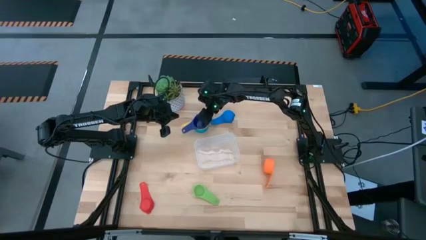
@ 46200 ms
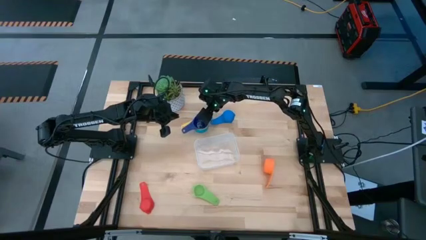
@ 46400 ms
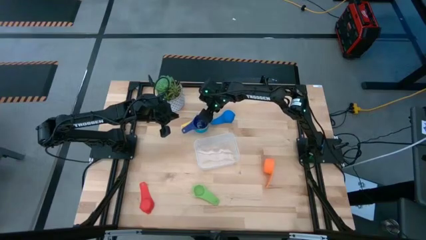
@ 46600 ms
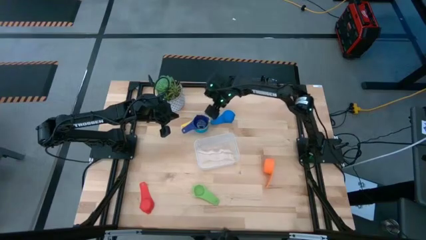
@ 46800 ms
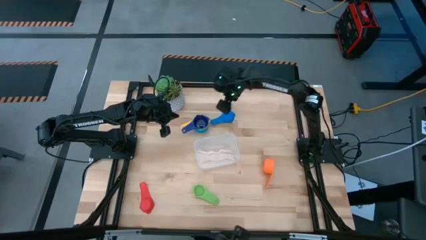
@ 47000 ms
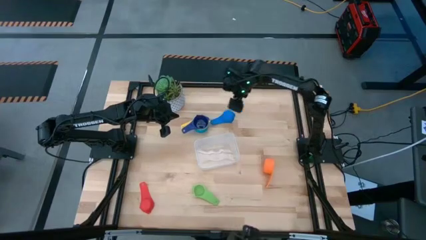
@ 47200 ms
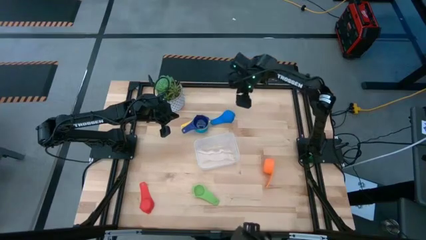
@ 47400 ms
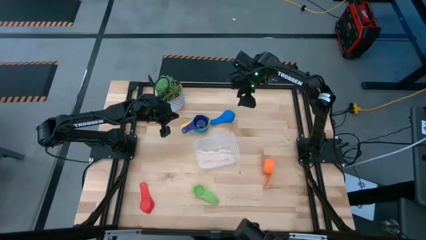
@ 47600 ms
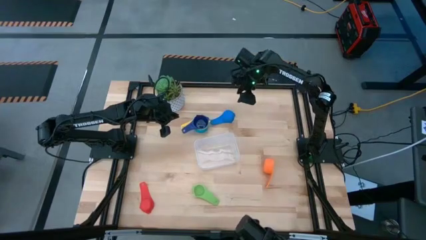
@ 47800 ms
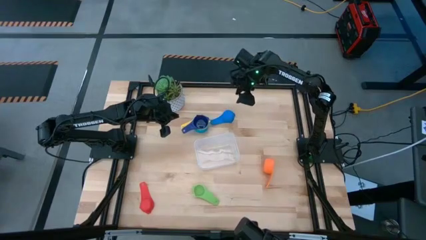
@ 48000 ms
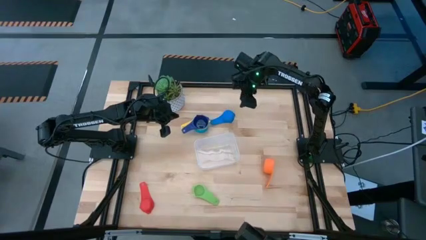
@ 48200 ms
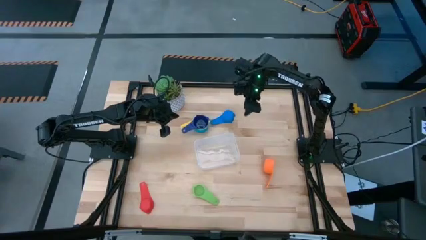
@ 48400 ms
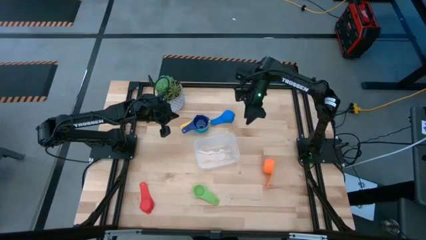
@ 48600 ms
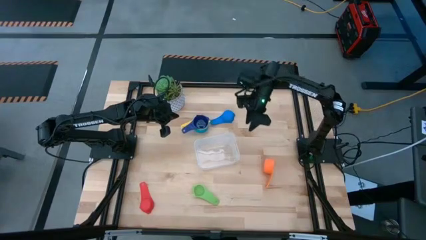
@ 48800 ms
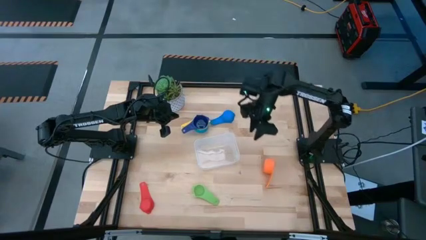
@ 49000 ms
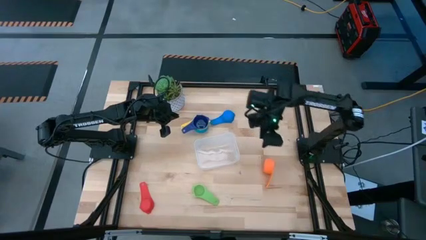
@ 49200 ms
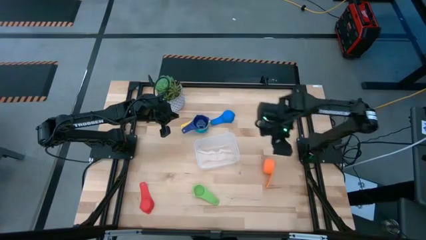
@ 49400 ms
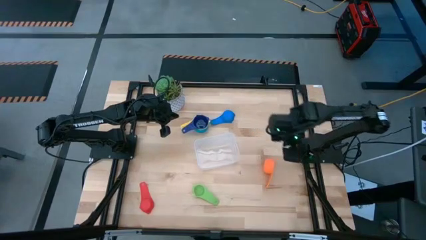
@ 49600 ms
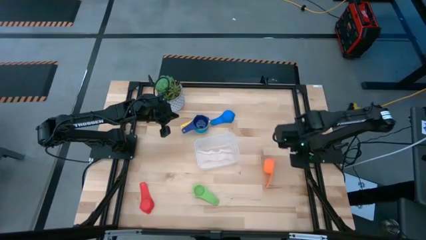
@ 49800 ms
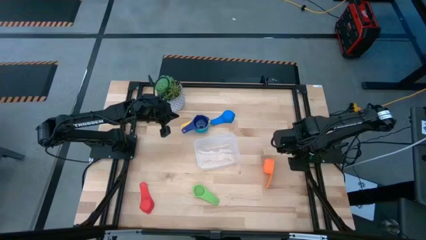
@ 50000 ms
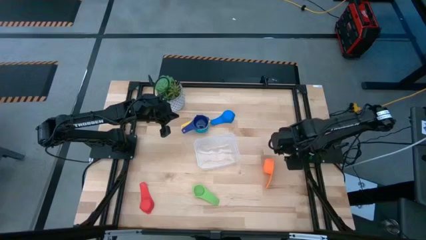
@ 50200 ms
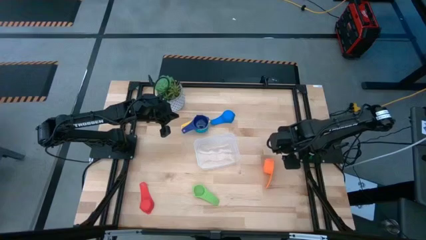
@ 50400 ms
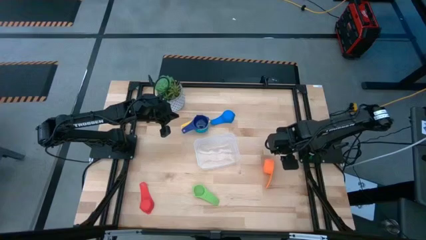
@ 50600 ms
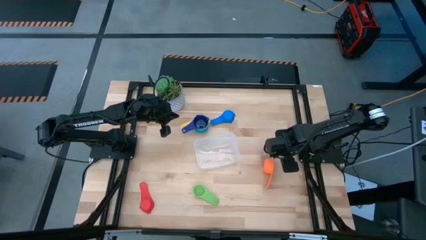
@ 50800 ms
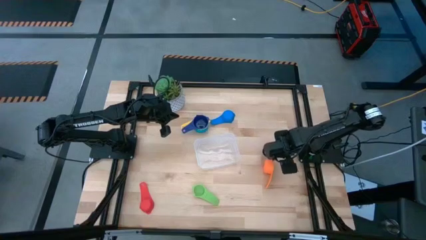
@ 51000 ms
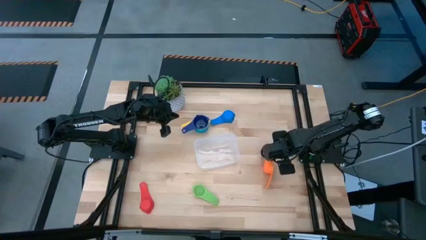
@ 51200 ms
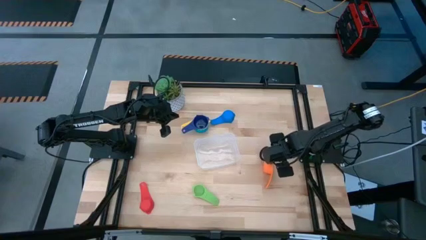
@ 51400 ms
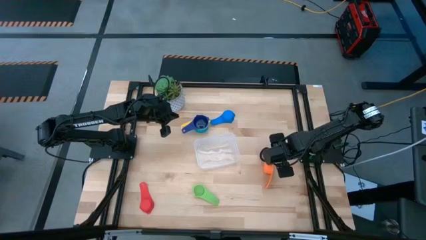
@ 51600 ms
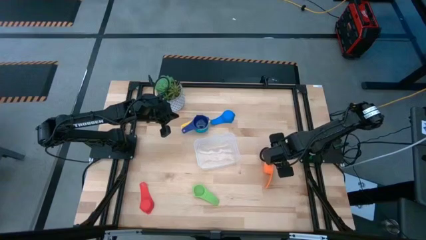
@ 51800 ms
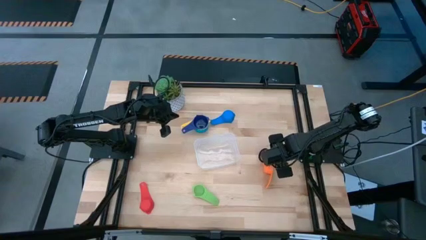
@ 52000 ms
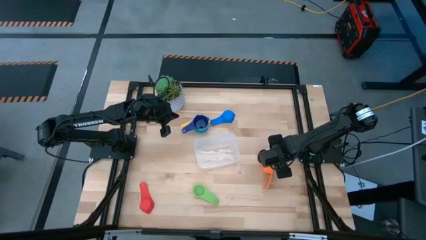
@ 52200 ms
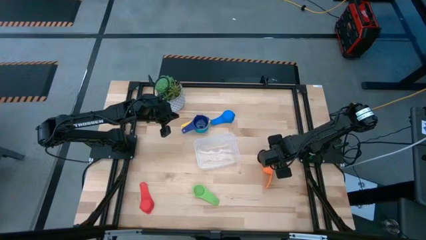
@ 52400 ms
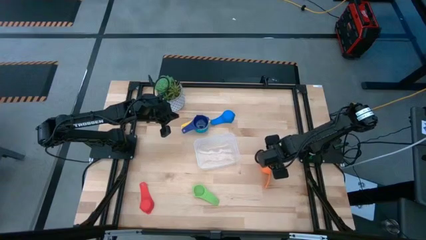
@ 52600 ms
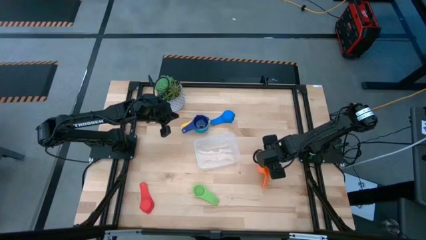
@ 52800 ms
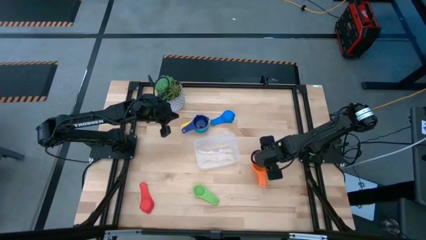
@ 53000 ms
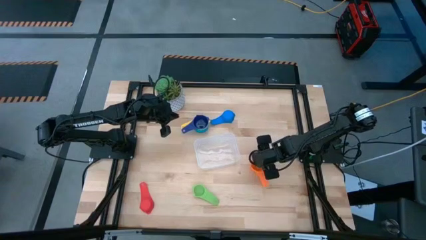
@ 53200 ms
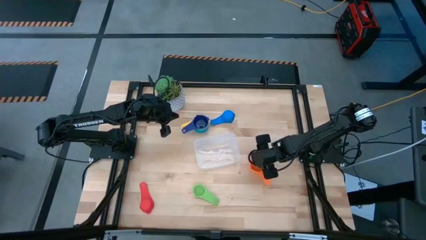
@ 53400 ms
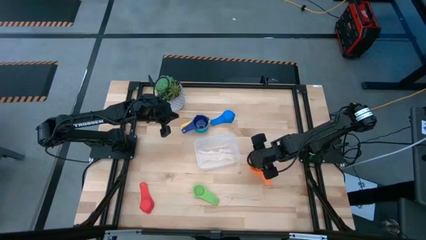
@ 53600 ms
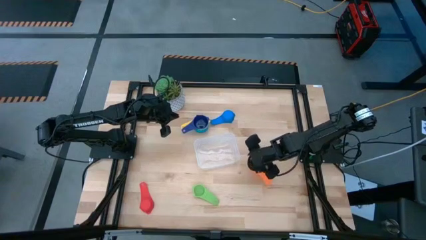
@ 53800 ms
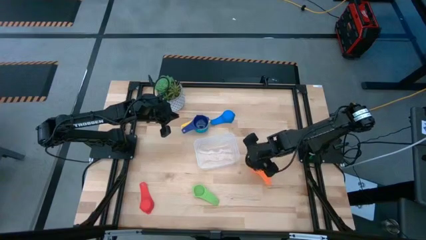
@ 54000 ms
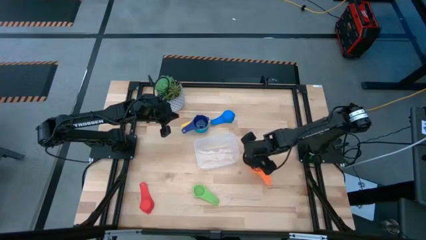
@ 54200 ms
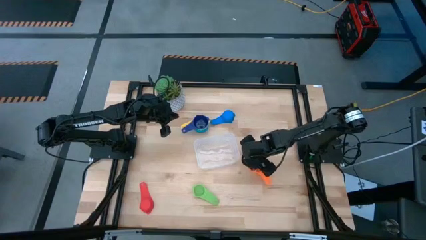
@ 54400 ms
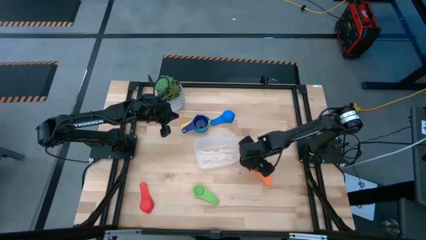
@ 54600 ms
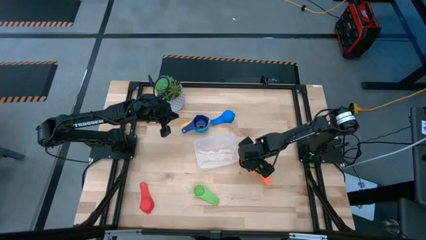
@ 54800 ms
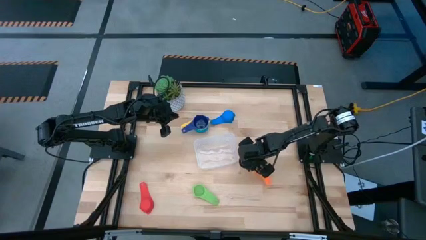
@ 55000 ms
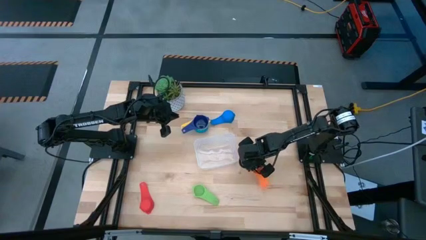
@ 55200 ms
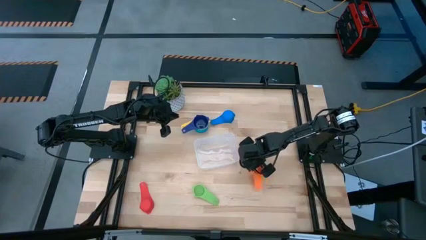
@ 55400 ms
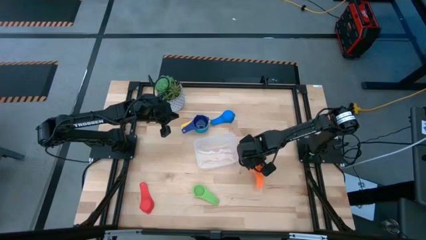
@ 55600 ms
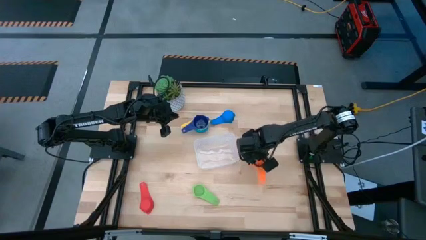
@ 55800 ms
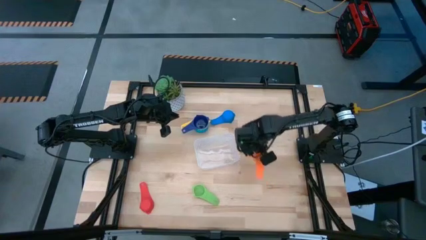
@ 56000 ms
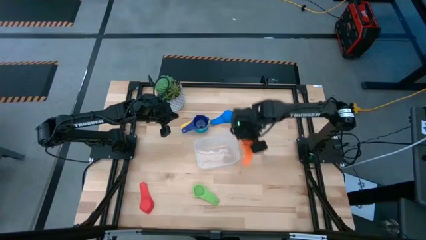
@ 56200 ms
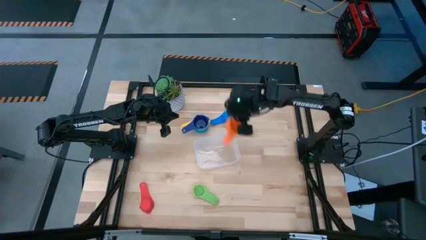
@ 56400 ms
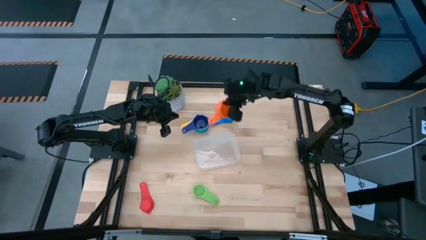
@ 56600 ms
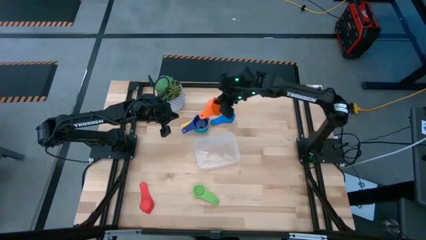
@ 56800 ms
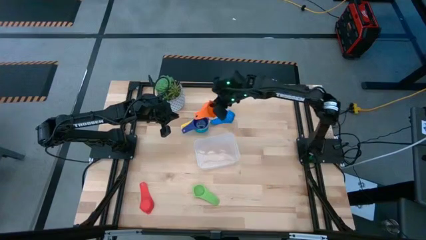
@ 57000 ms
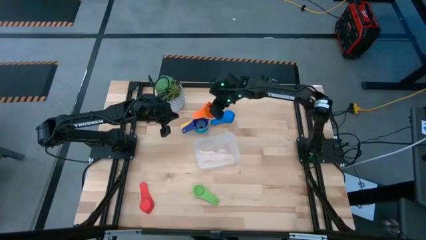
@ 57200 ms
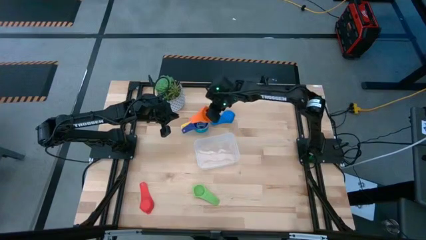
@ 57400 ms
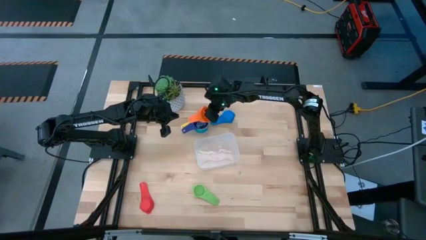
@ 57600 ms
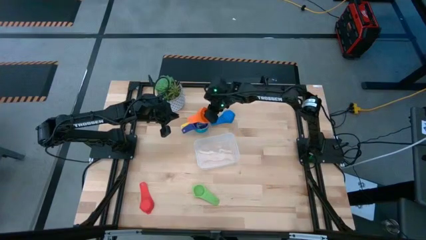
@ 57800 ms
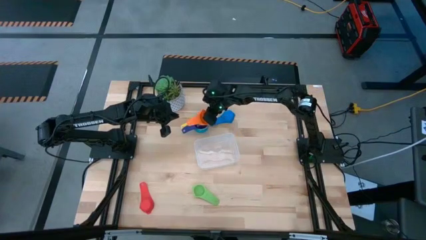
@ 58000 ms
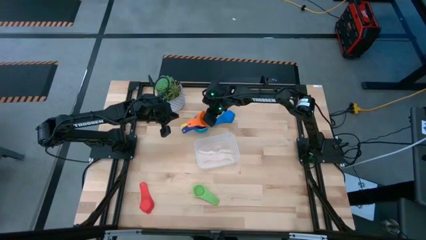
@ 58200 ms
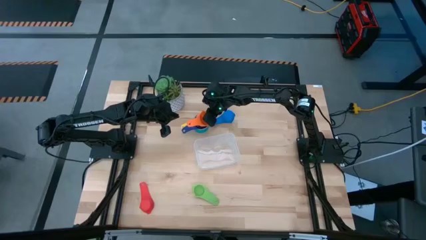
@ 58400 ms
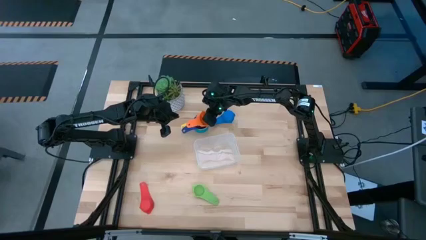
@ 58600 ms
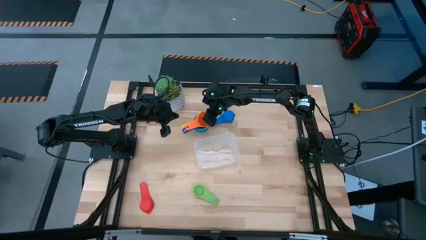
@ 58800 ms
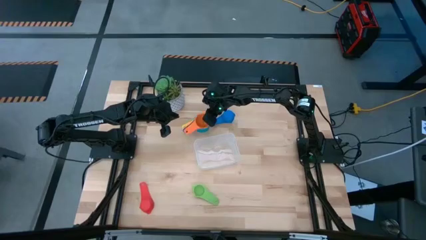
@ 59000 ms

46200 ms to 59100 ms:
Task: Nest measuring cups in basket
Stack the orange measuring cup on top of the dark blue measuring cup

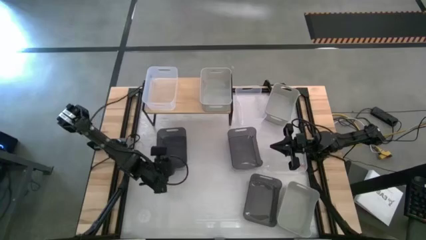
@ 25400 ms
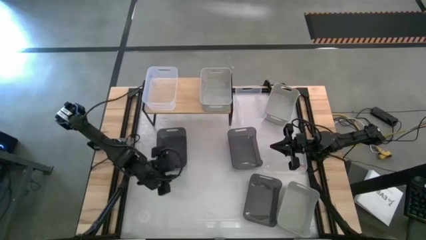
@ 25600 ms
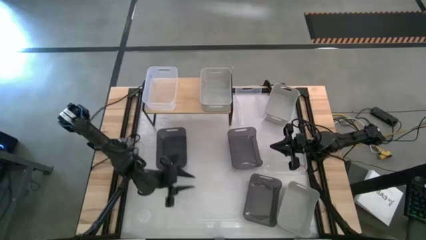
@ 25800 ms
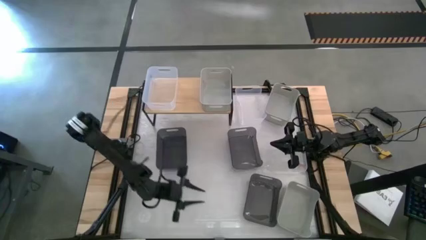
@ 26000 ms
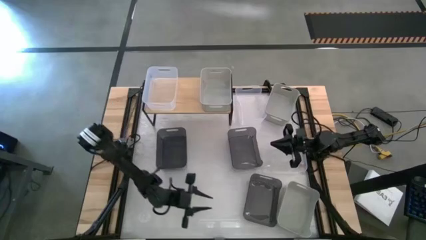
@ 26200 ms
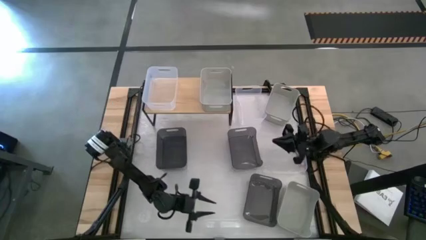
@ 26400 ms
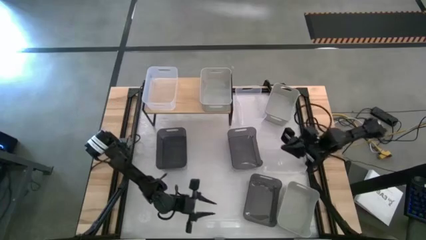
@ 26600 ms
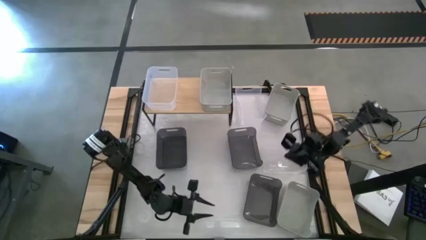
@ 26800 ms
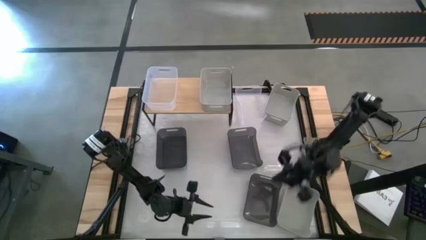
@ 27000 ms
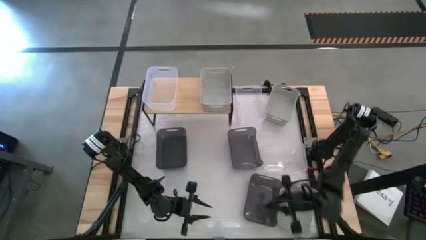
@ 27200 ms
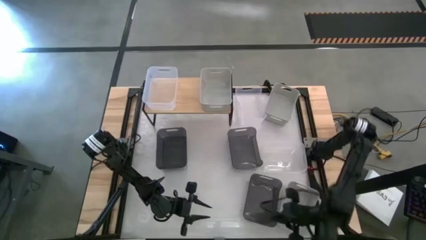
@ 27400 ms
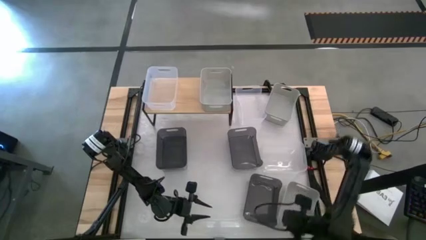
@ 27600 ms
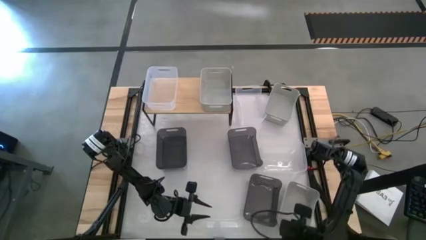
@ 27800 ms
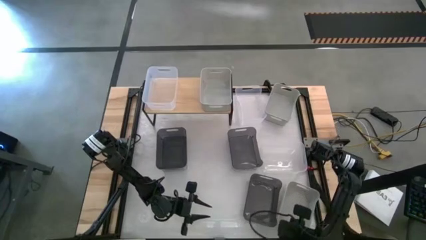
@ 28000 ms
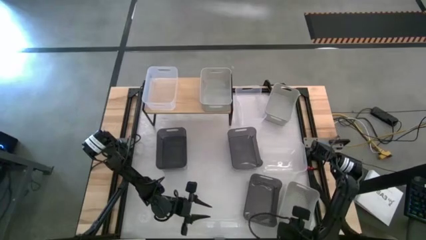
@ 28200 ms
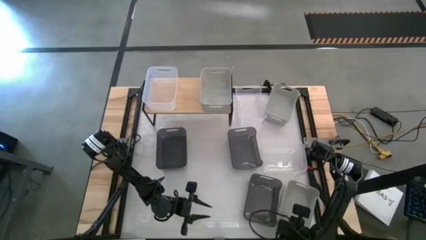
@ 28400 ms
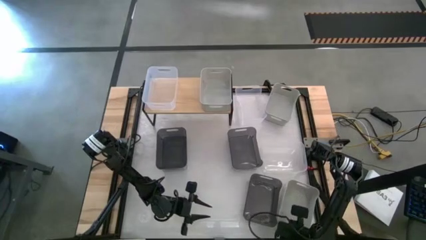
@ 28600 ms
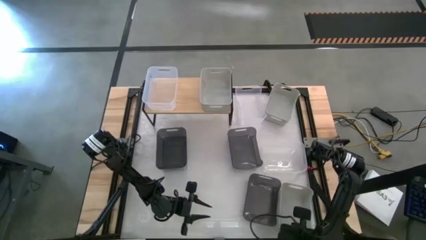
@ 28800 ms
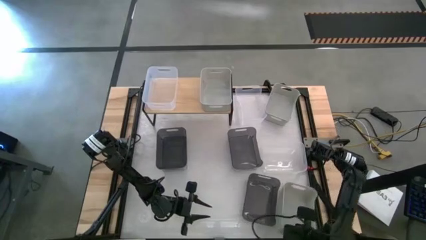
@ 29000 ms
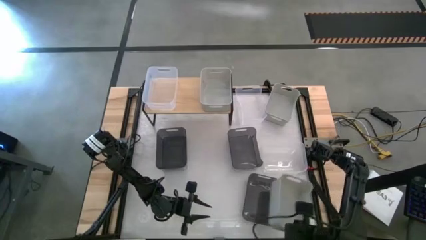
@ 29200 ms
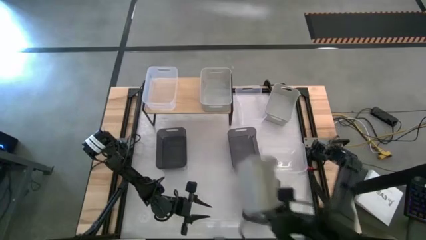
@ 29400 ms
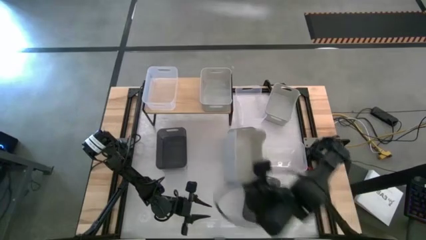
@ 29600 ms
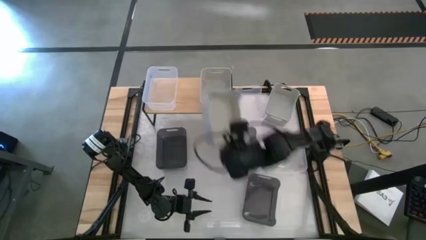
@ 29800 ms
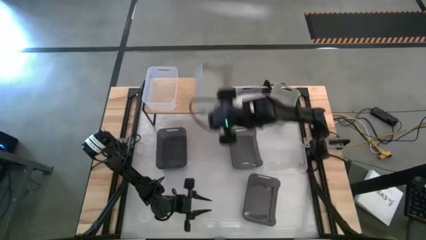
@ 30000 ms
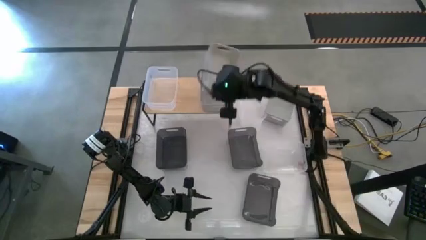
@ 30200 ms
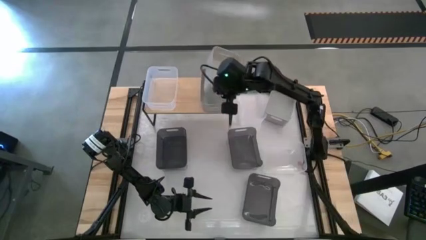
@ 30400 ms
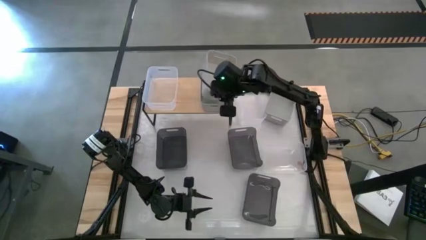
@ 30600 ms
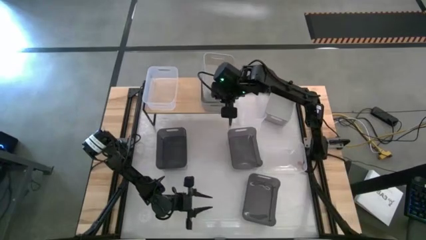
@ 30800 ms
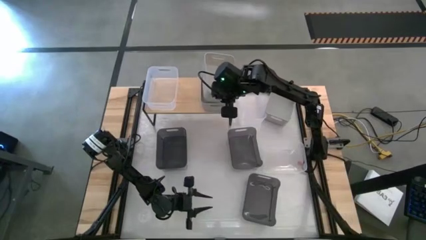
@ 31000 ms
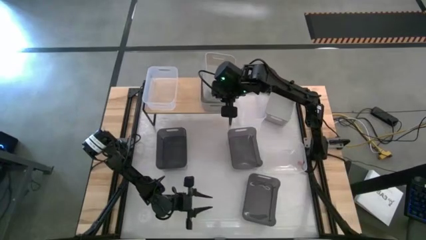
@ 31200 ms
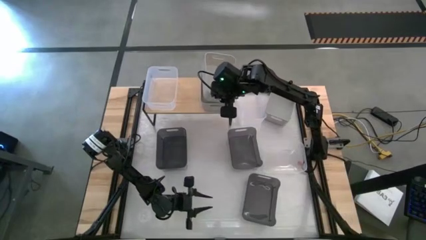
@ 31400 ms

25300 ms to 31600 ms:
Task: Stack baskets on shelf by color
Stack the right gray bin on top of the gray bin on the shelf
